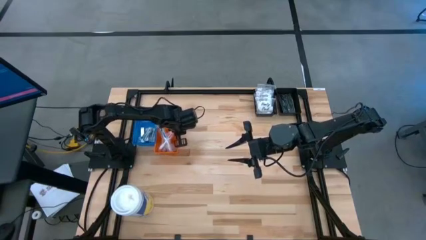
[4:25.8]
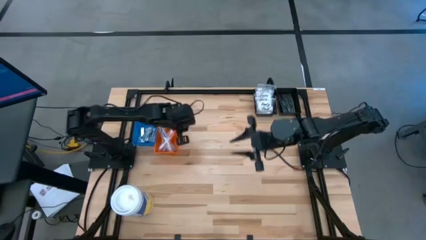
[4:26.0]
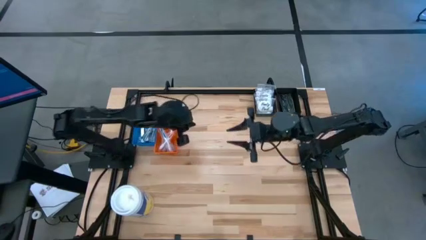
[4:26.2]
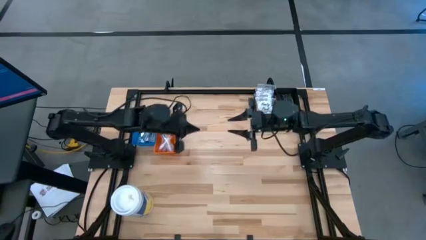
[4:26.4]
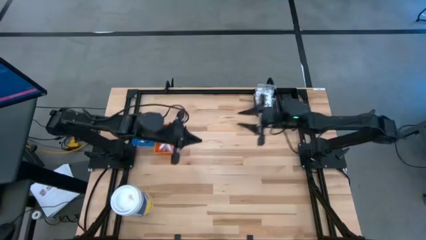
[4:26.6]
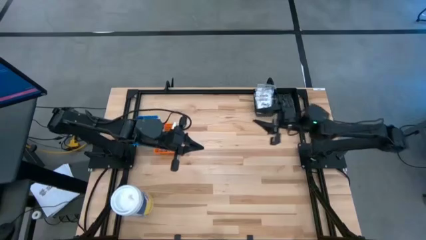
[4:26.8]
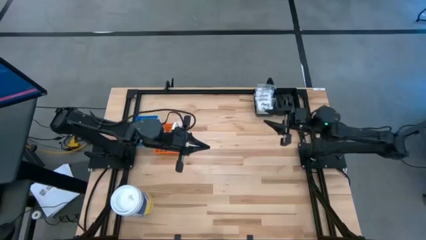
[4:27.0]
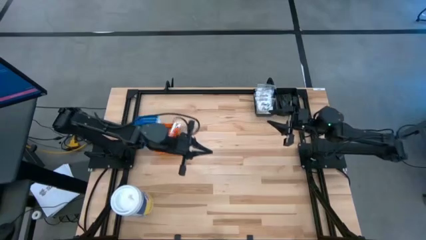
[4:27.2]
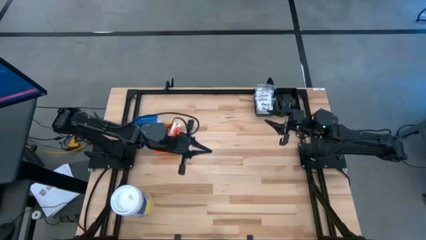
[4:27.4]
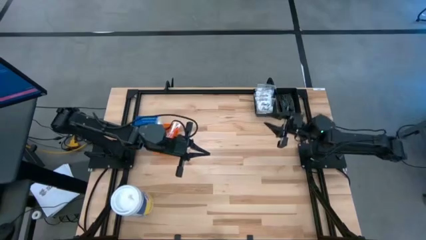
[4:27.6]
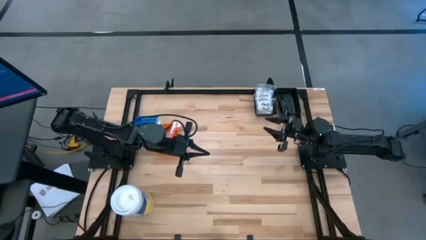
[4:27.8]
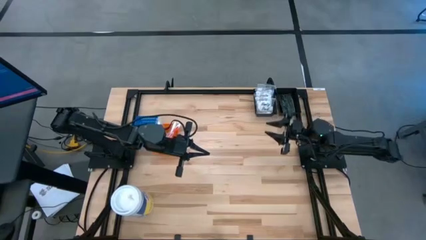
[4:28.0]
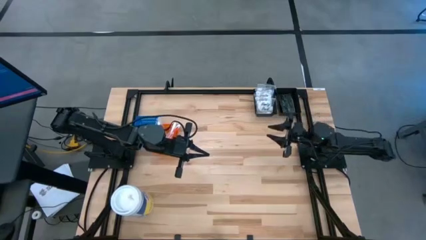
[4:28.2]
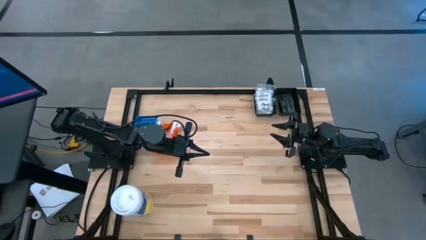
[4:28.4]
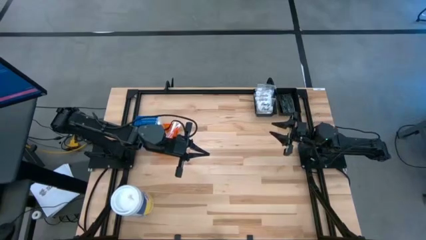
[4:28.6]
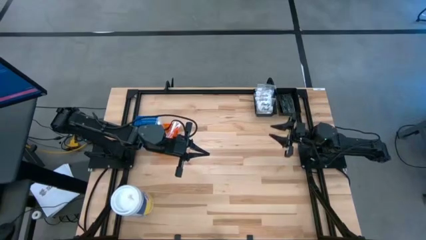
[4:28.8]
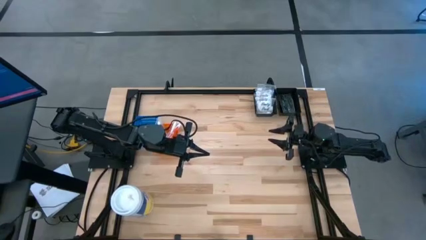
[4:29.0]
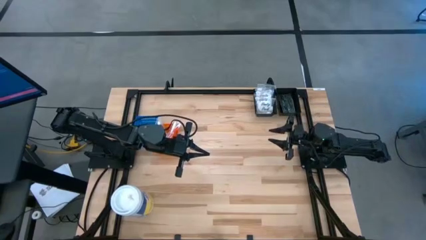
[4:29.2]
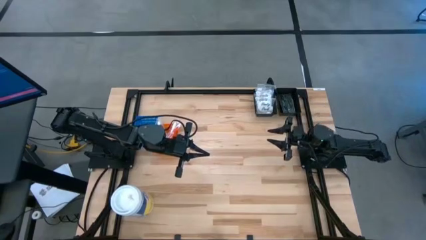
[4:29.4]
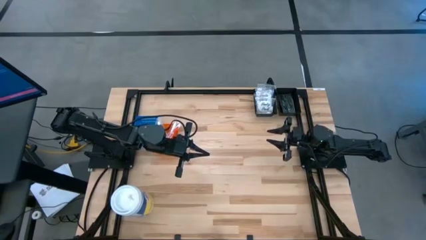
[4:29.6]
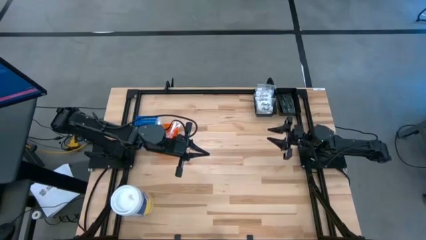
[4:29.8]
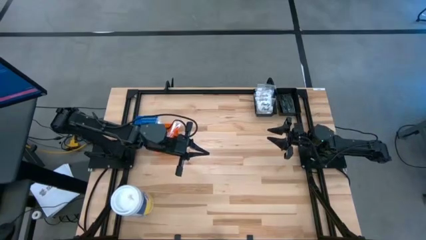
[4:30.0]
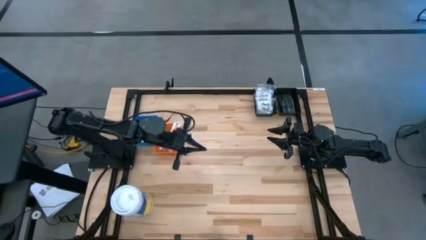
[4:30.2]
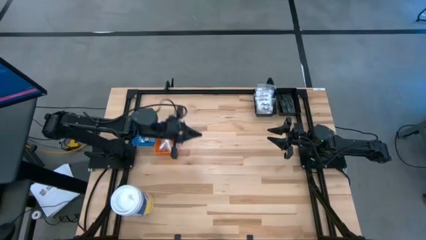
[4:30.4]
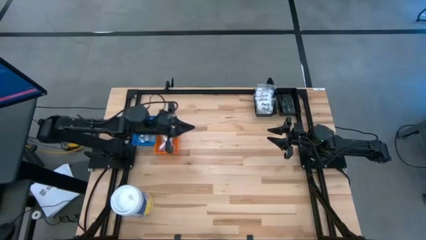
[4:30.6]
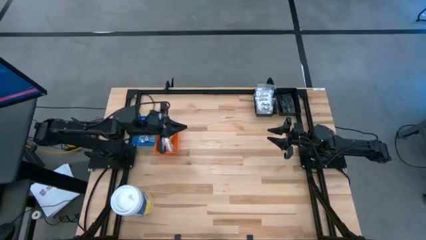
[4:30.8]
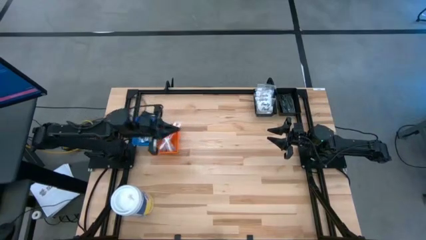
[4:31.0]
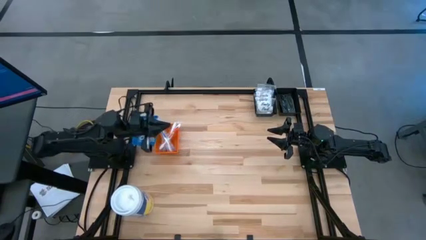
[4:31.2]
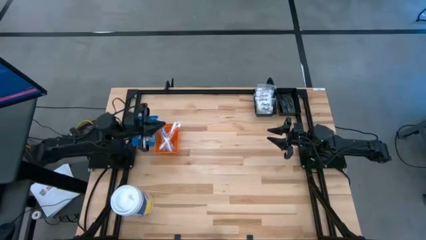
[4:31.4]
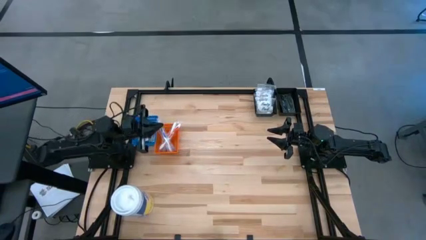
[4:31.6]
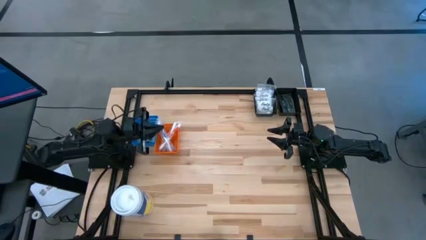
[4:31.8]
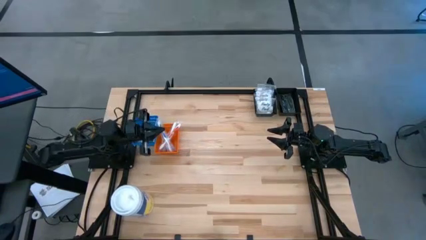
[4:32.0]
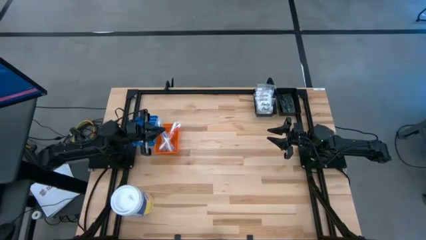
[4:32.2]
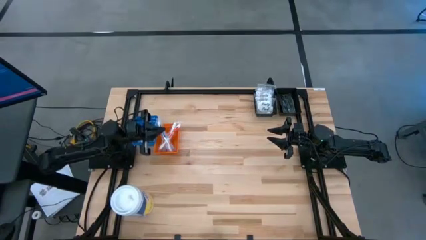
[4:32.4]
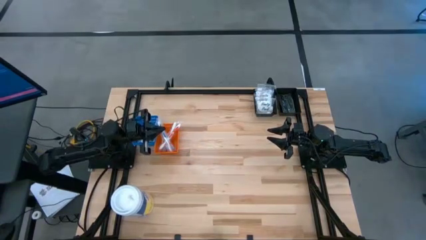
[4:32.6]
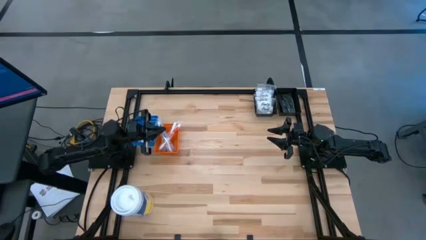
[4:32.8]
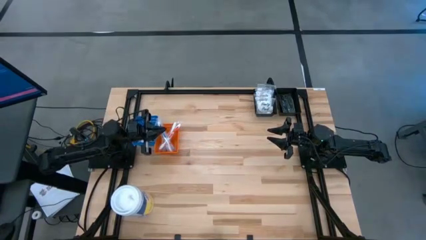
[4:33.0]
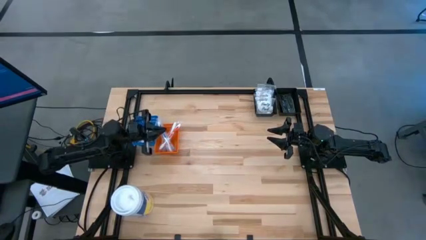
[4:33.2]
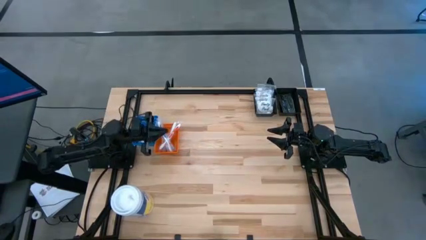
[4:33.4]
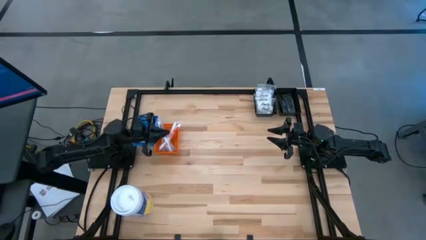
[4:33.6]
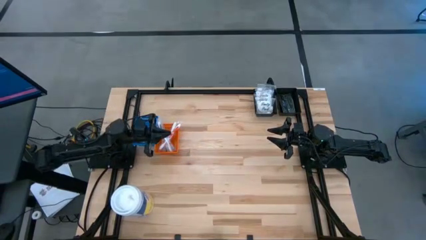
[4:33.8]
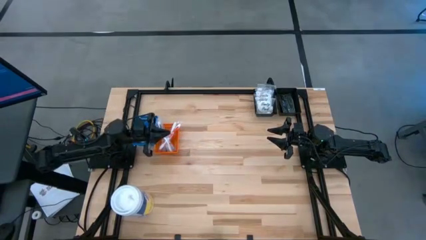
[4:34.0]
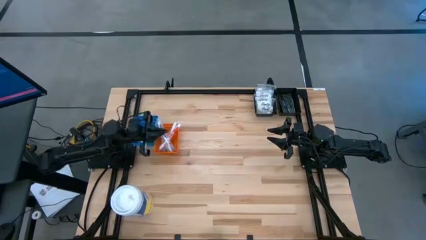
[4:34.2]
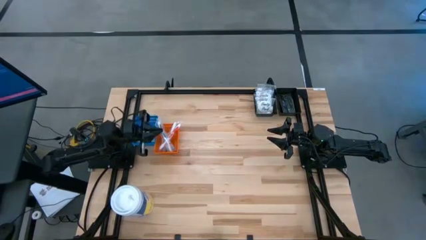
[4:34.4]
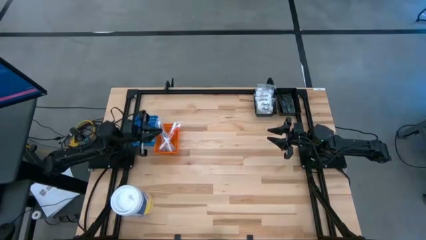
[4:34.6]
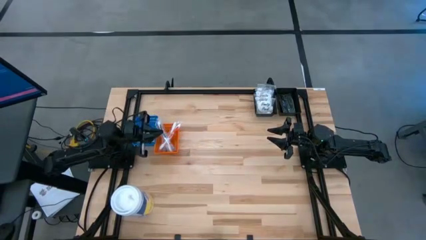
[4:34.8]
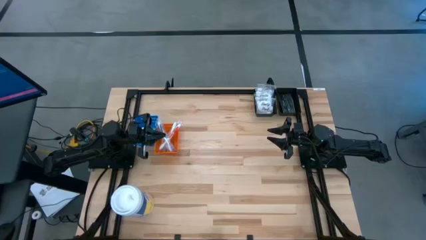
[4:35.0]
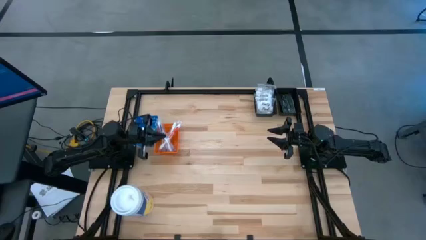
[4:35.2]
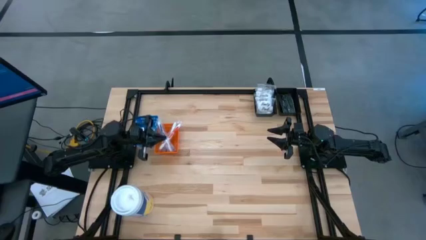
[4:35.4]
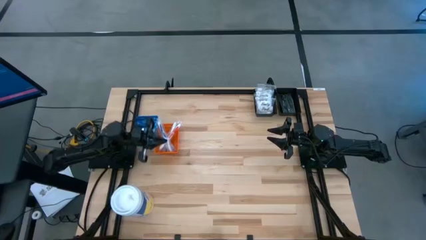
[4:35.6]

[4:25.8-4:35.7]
Task: Pick & Place Travel size toiletries
Return to Home Position

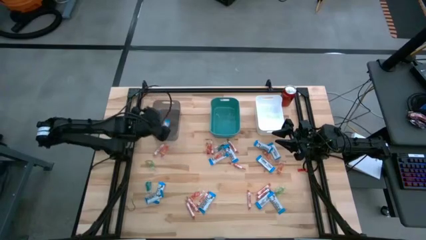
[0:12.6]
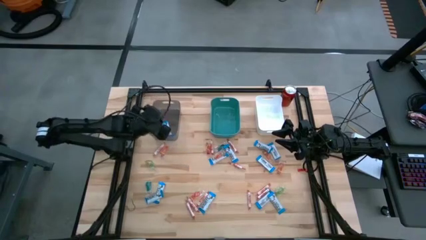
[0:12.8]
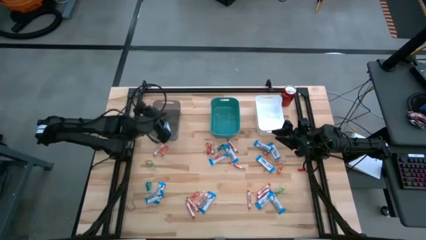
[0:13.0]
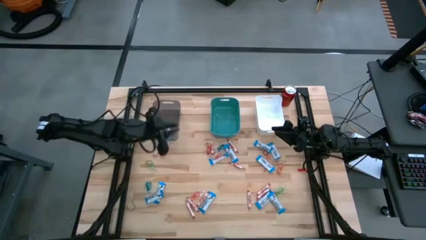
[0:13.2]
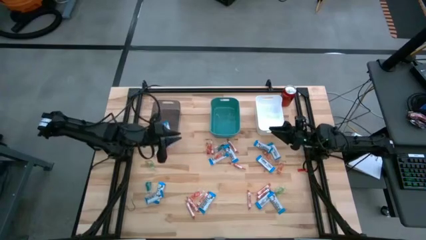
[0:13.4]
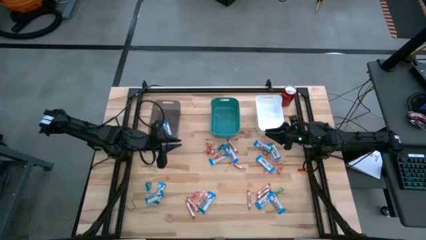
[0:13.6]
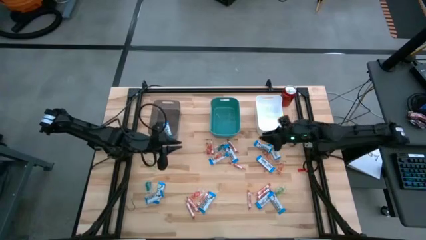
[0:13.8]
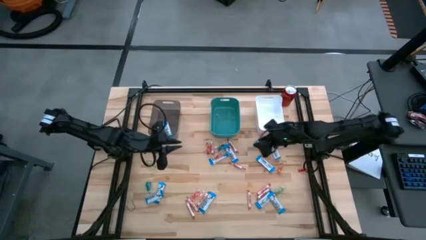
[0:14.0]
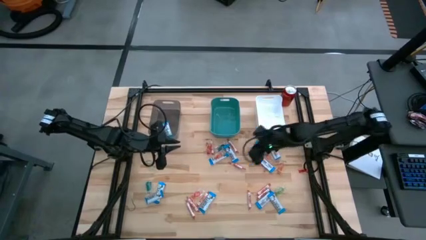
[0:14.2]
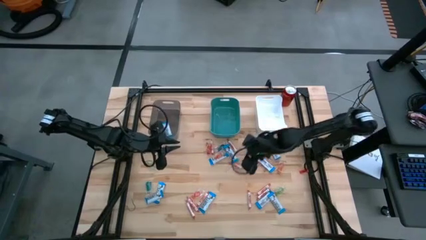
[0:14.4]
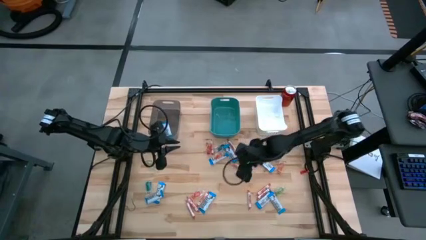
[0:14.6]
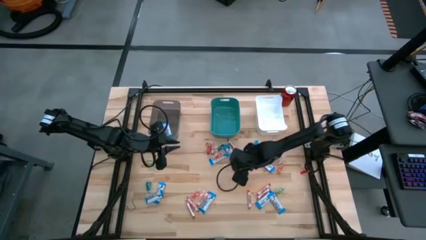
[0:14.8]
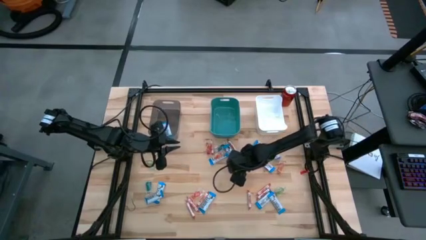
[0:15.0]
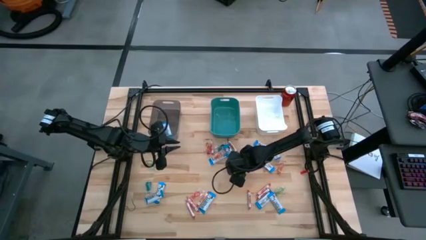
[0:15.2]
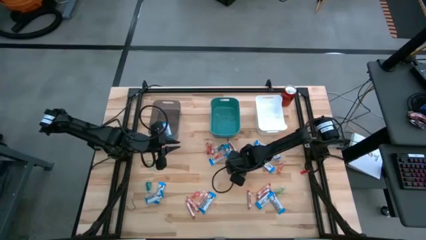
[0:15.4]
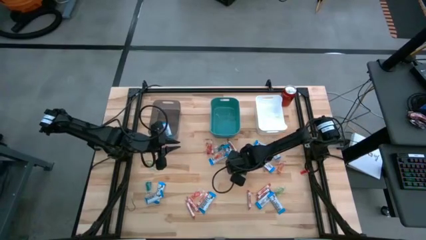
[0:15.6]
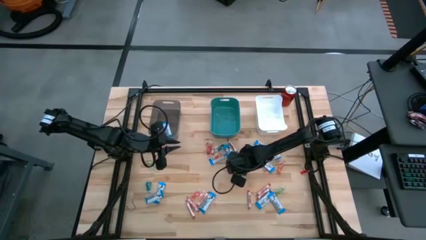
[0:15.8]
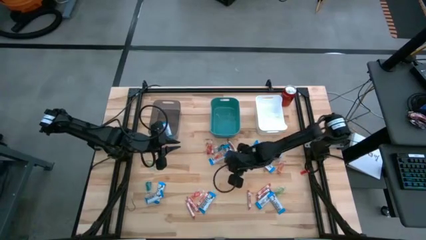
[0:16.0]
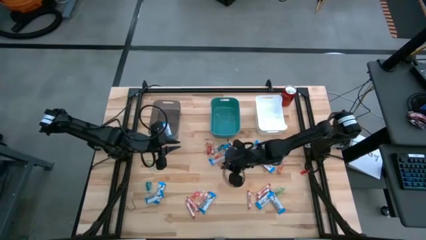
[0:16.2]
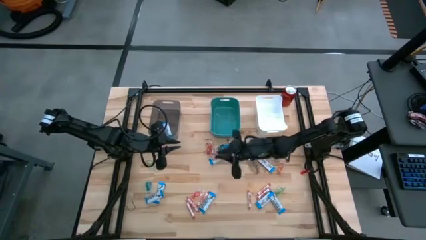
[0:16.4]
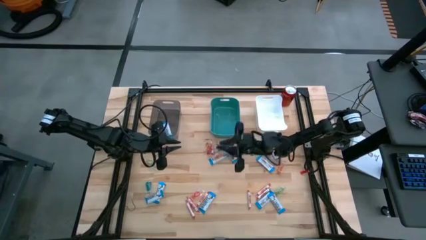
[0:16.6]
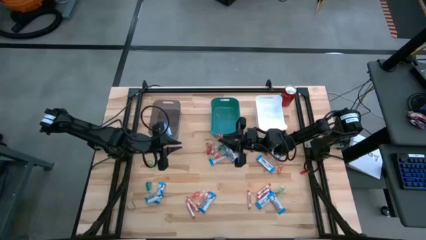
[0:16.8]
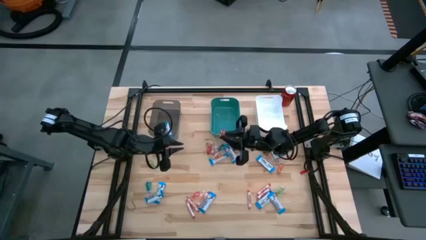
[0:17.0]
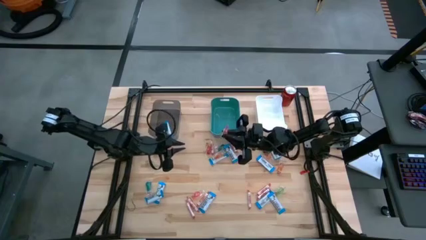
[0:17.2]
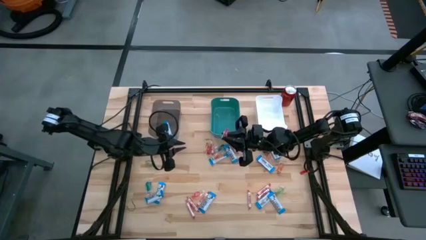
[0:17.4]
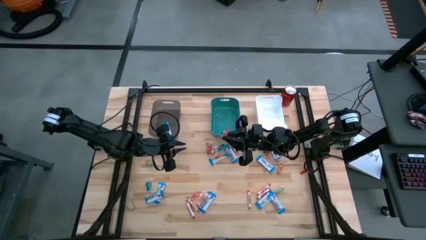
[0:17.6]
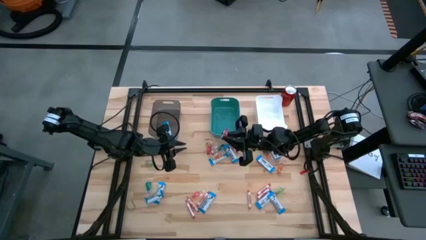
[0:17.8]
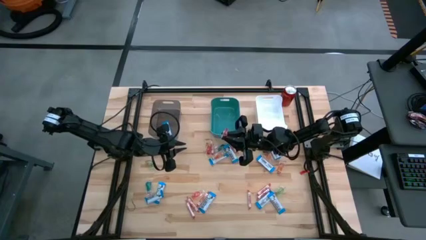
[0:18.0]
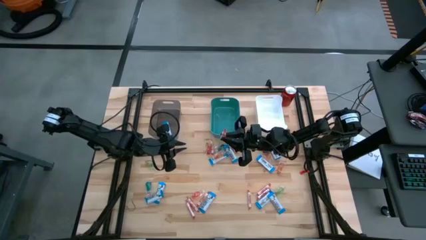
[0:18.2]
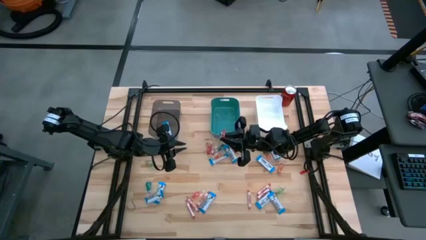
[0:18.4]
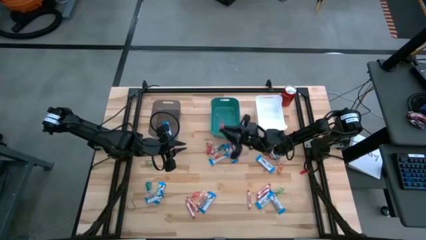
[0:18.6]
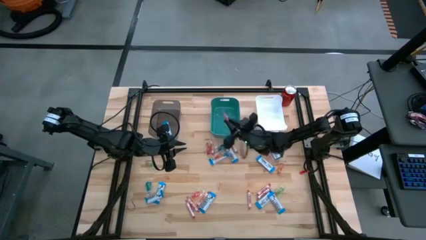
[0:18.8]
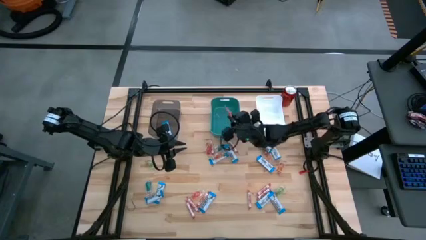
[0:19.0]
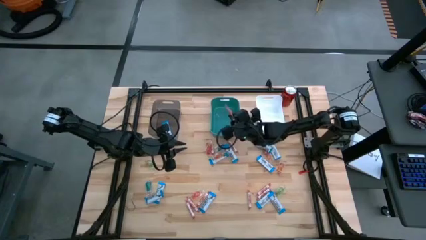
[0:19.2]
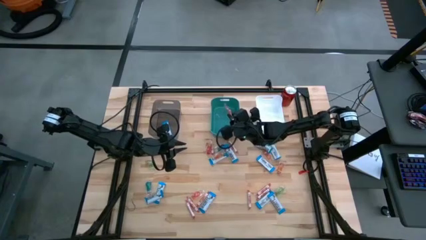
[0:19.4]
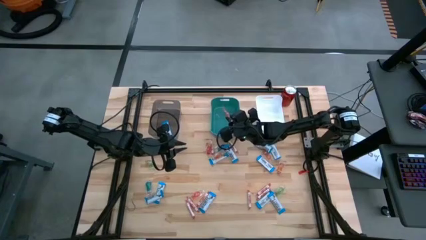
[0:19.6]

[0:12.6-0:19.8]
Task: Sort candy
Put the red candy into the green bin
